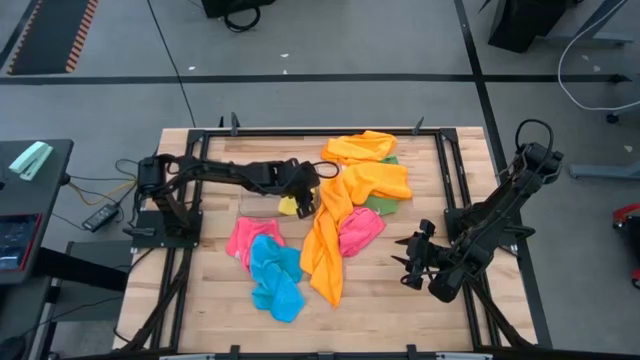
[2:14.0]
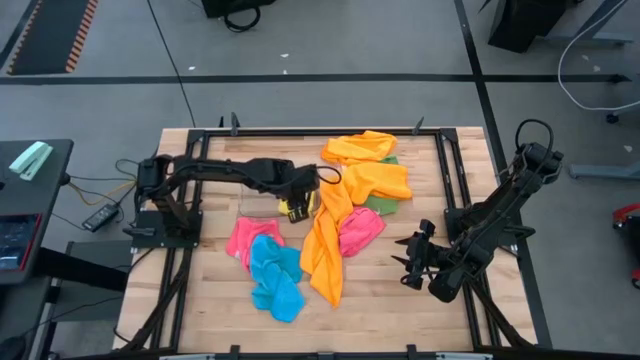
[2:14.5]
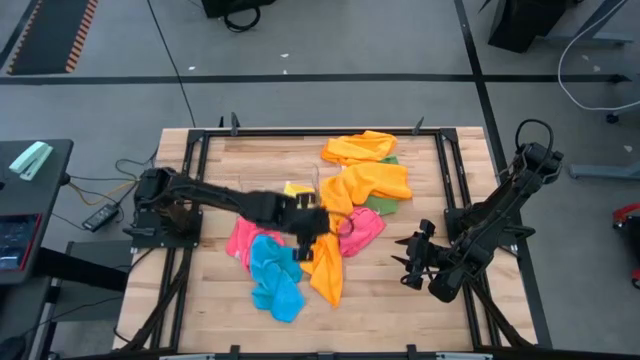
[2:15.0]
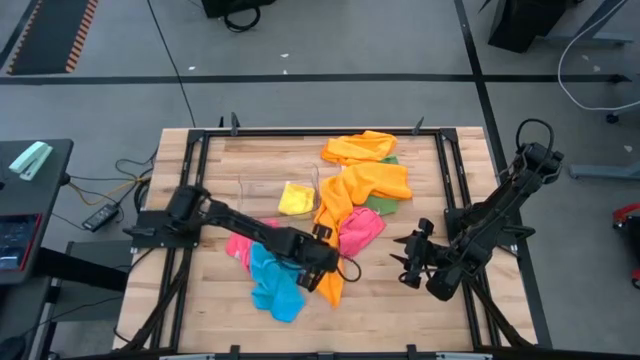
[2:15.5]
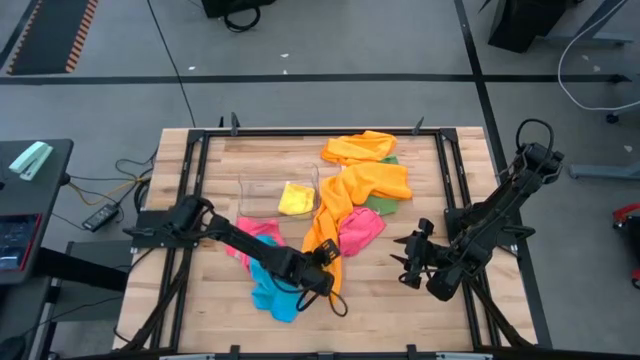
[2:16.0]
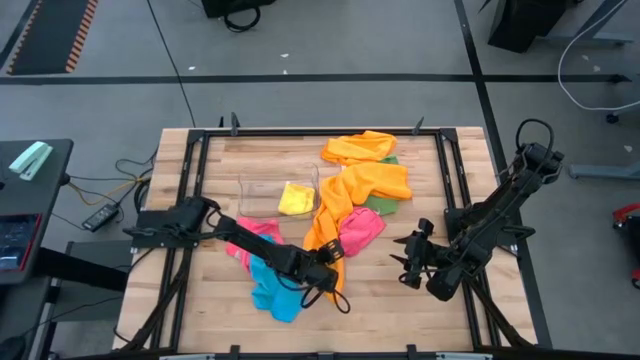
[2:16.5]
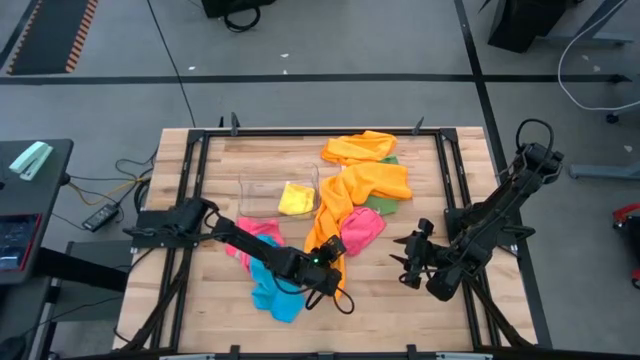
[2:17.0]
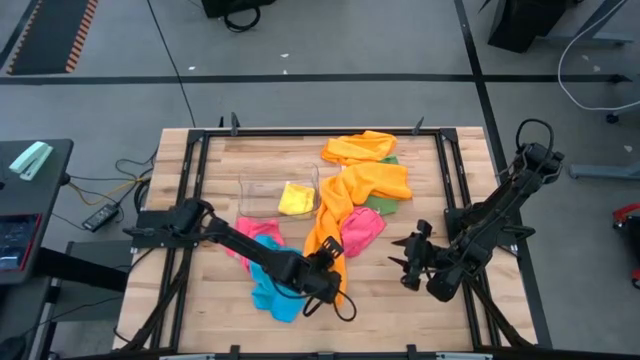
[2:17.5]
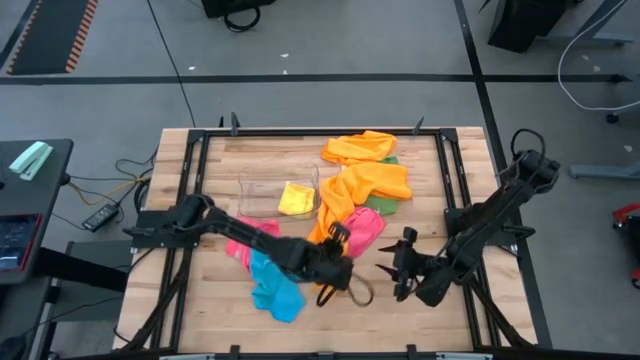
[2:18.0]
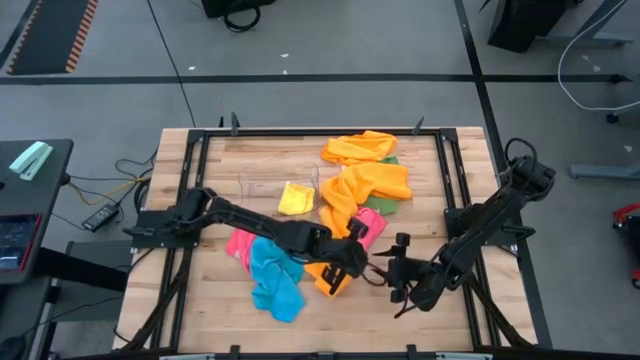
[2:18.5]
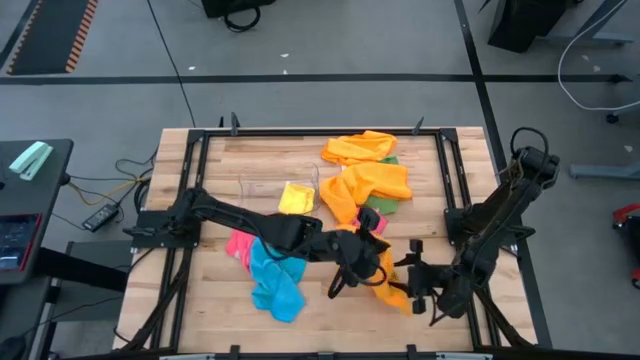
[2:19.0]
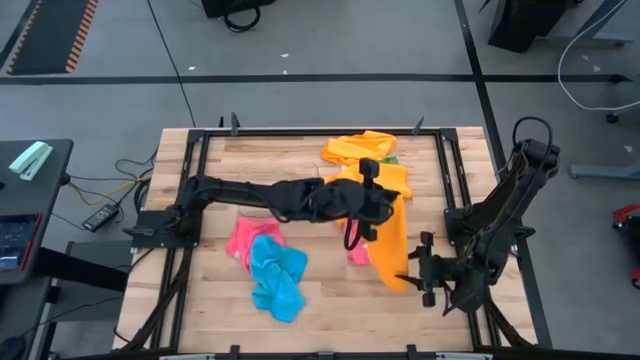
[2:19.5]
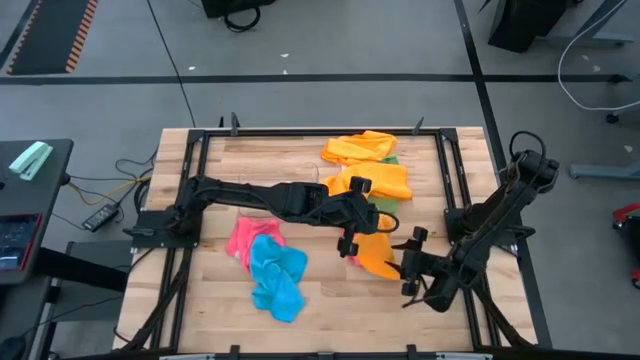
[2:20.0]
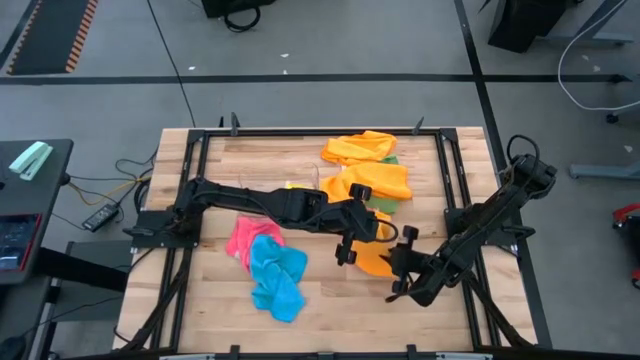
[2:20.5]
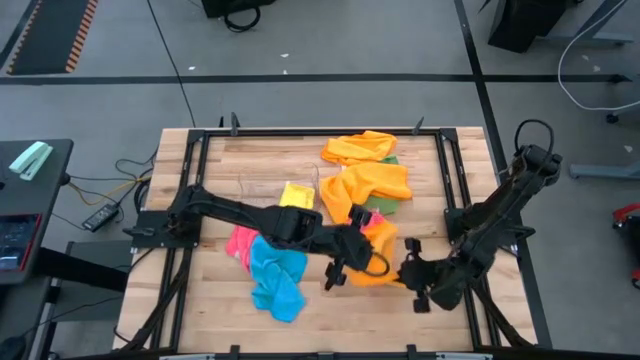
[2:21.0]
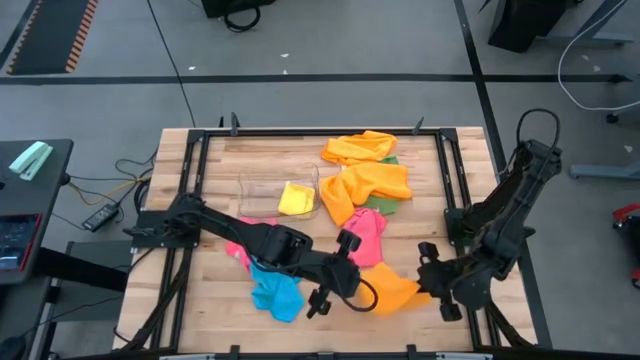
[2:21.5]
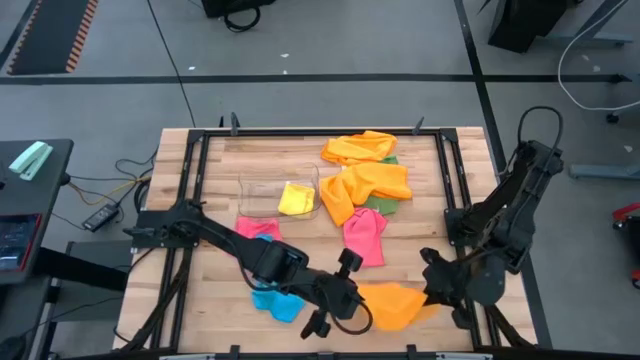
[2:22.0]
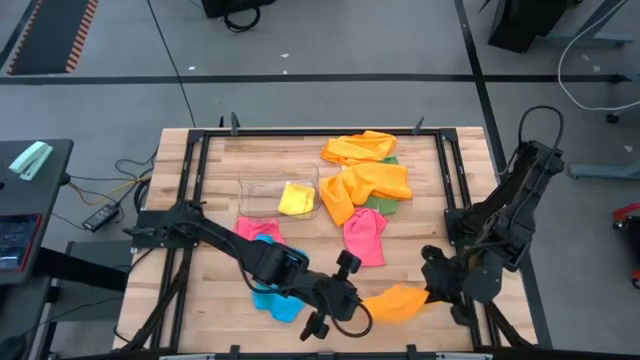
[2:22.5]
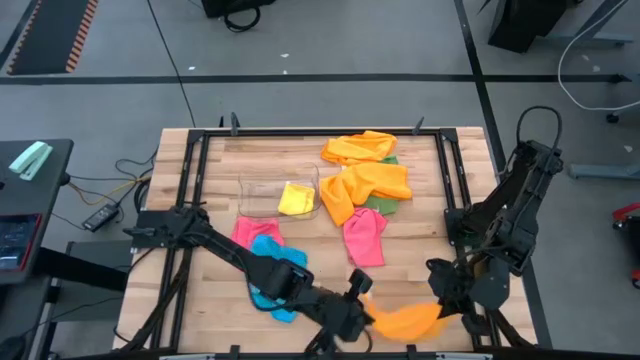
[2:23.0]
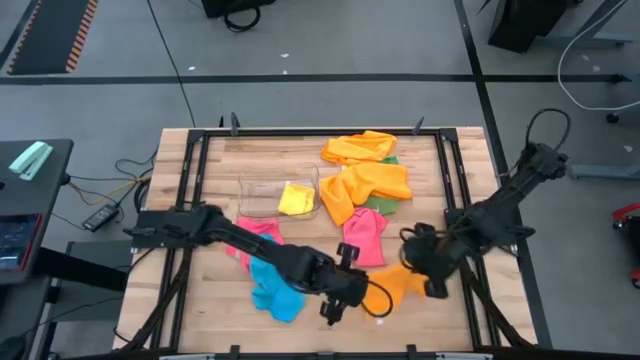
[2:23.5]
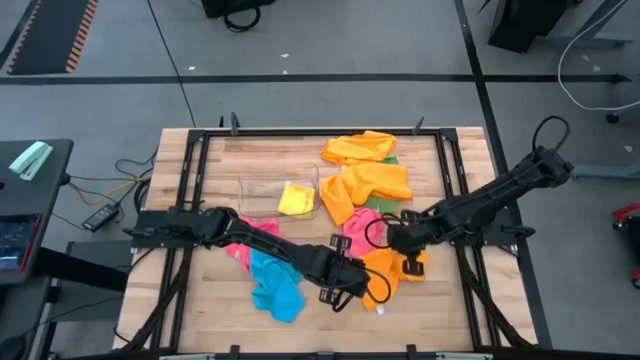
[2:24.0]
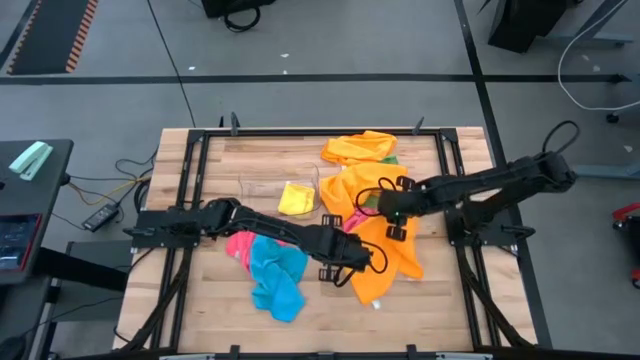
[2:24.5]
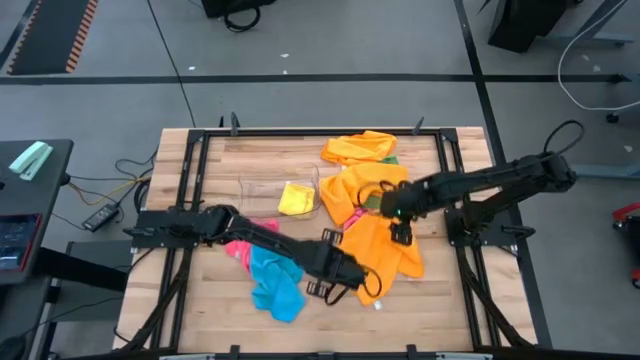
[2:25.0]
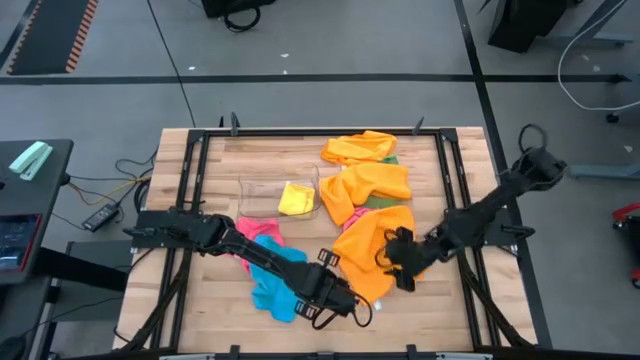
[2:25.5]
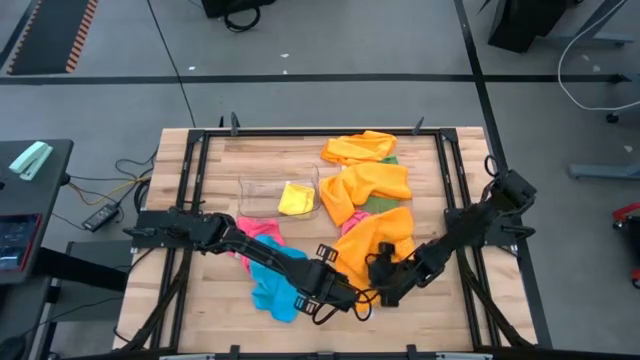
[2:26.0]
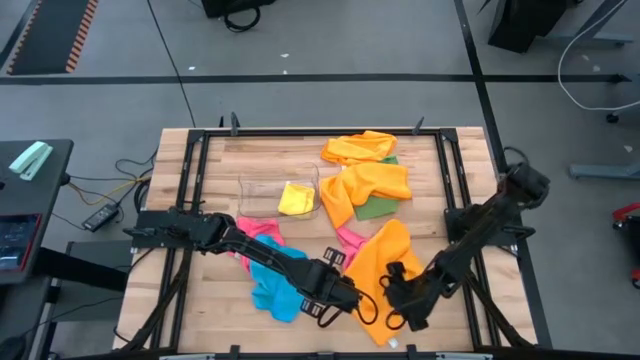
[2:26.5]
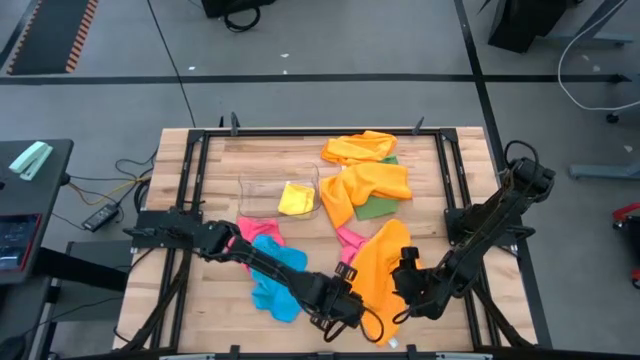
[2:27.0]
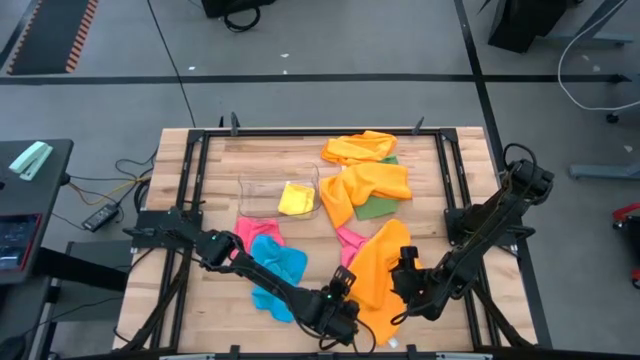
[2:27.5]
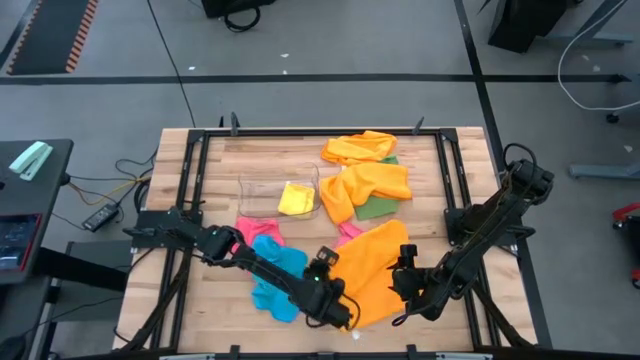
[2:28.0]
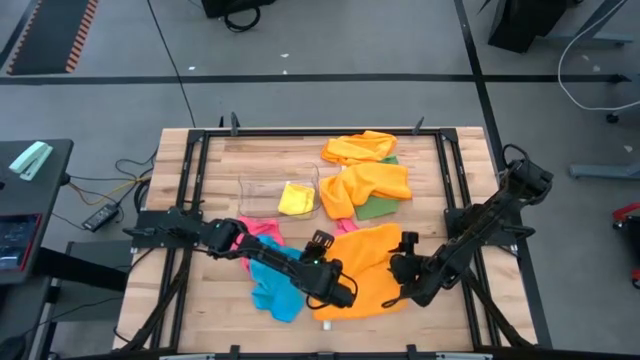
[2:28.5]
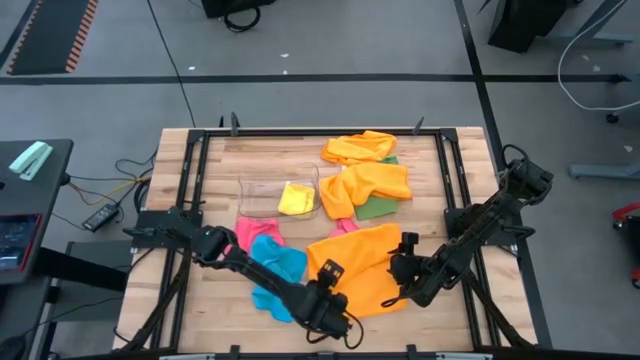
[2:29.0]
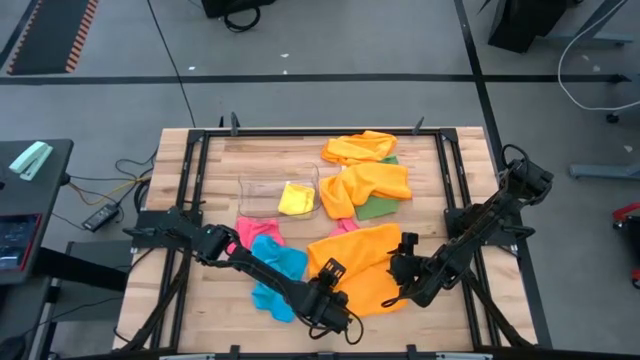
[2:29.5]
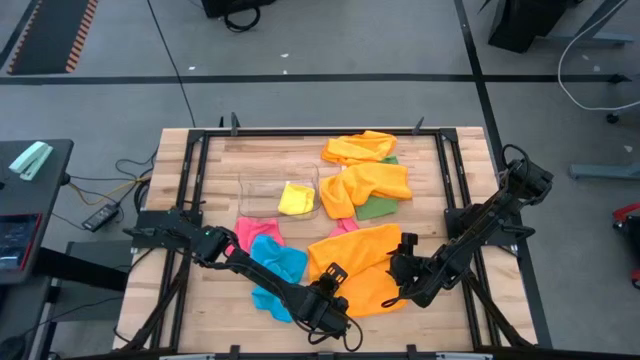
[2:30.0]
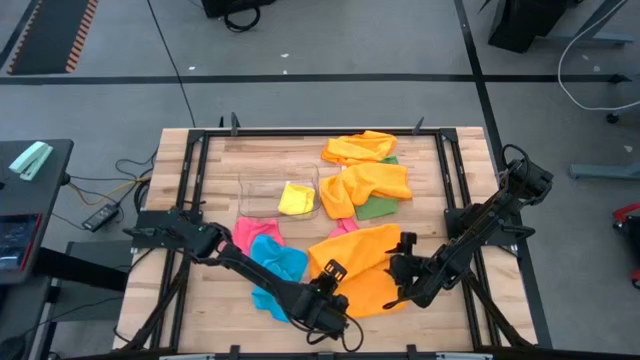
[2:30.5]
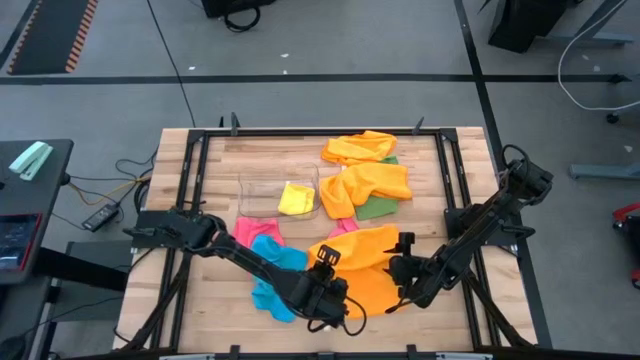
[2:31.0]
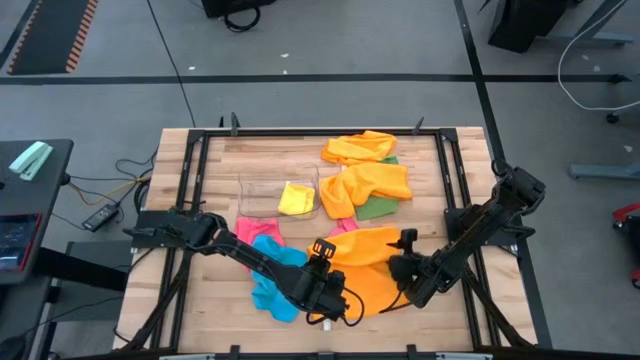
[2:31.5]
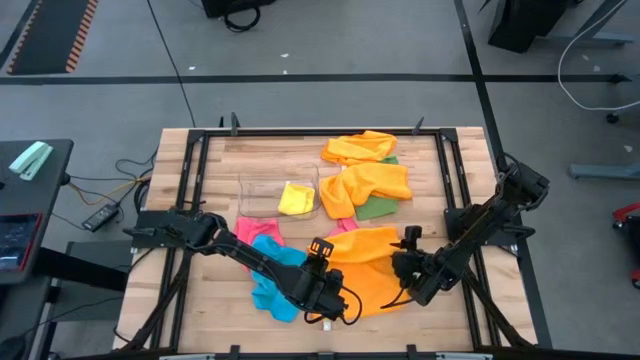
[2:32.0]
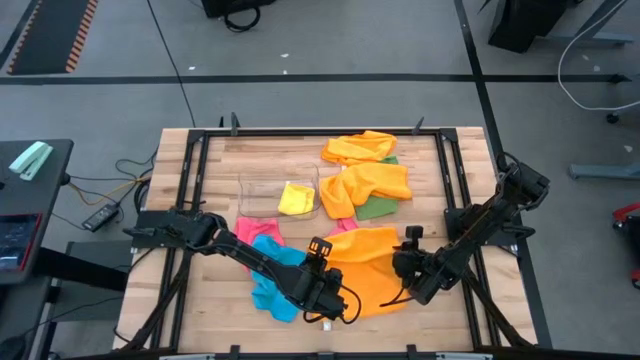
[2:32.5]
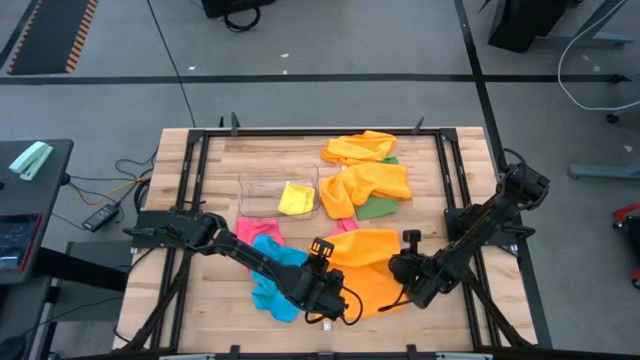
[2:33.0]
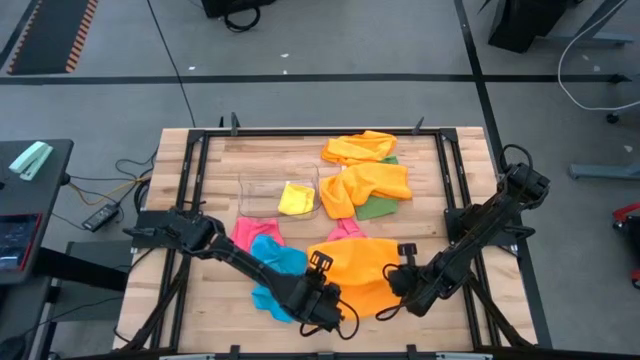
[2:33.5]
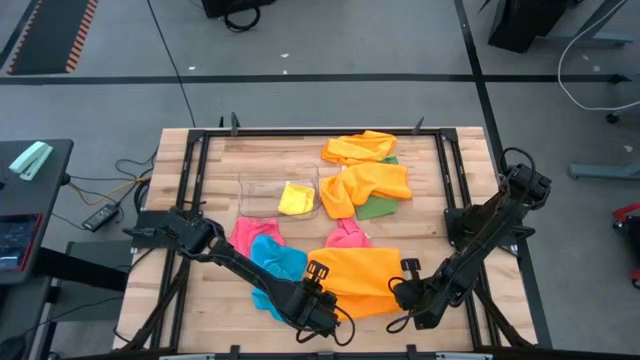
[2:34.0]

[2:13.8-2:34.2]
Task: Fold microfiber towels
Fold the bottom orange microfiber cloth
